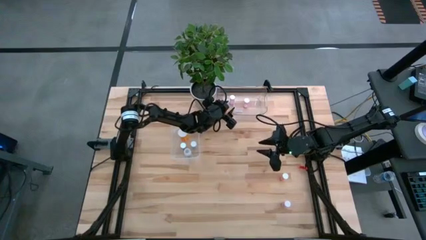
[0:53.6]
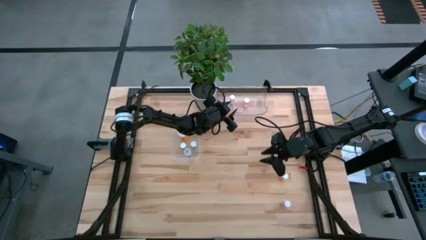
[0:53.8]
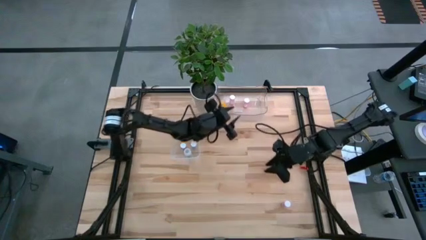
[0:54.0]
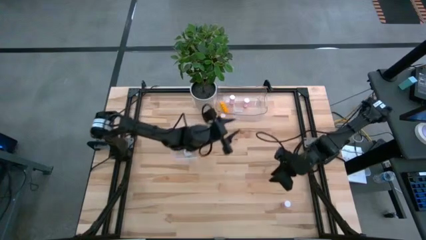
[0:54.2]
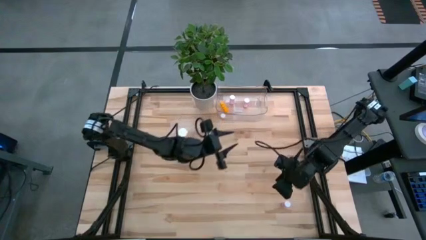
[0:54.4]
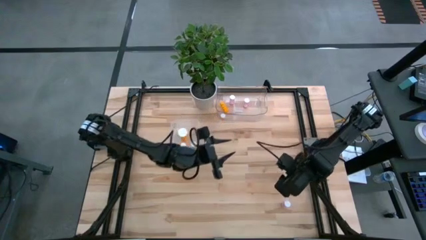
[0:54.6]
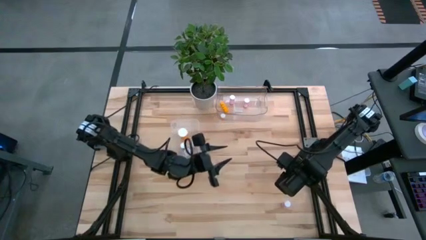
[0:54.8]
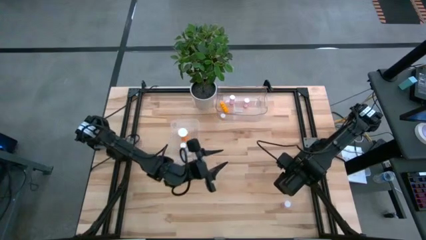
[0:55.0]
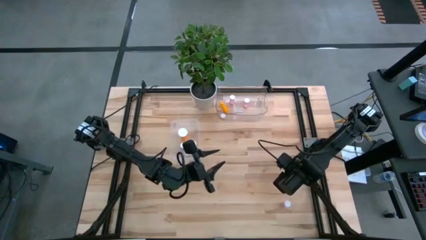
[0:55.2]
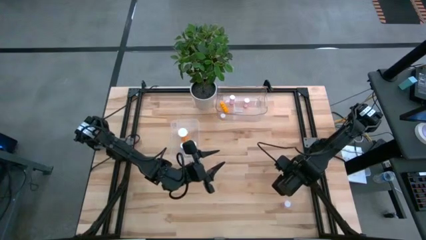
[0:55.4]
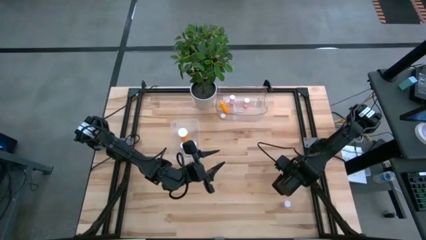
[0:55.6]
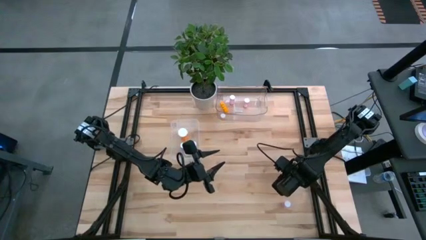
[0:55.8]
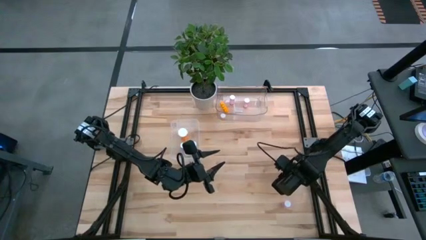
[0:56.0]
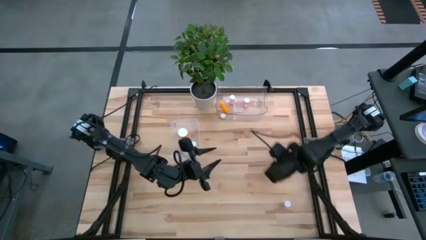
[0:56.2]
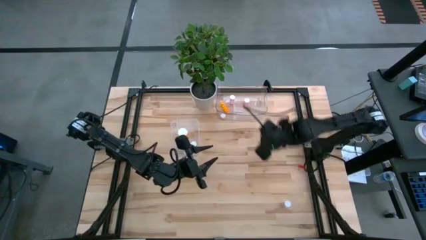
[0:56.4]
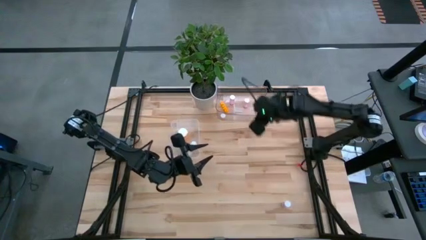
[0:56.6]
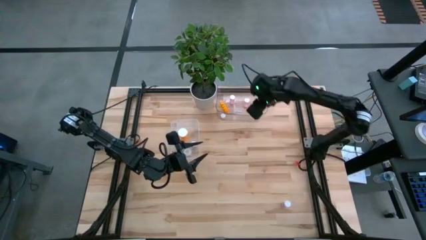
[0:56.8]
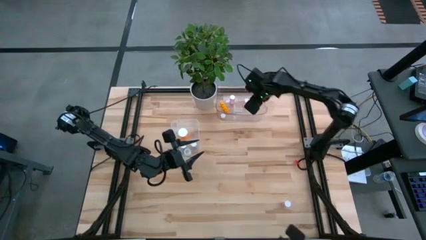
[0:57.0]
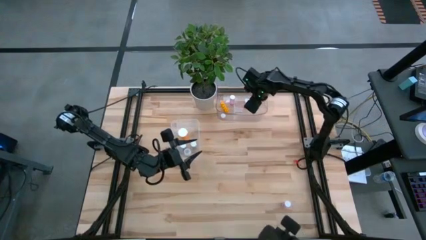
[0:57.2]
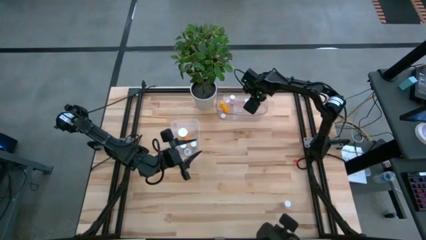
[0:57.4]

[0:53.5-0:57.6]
Task: Pick and place medicine bottles into bin by pill shape (circle, oval)
Put the red pill bottle into the top transparent bin

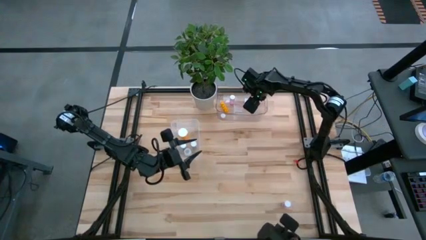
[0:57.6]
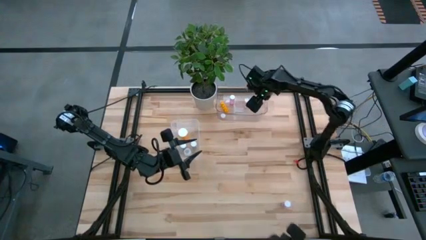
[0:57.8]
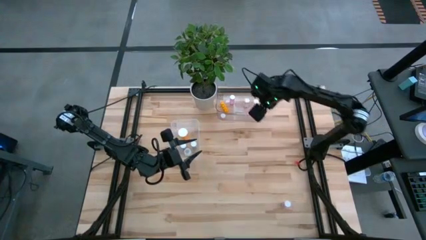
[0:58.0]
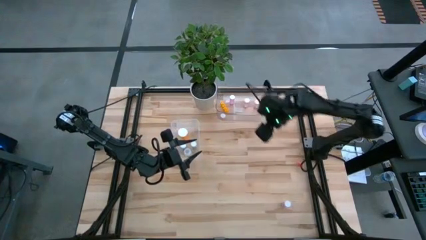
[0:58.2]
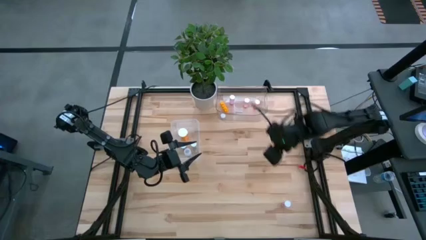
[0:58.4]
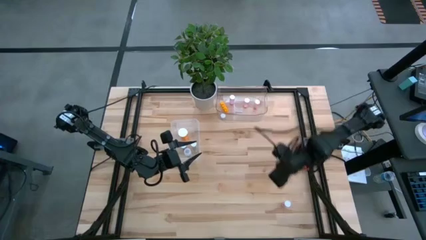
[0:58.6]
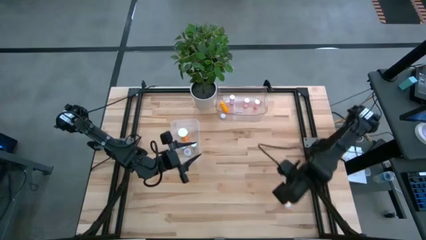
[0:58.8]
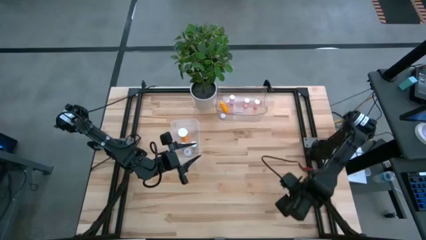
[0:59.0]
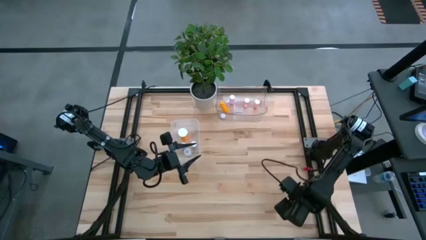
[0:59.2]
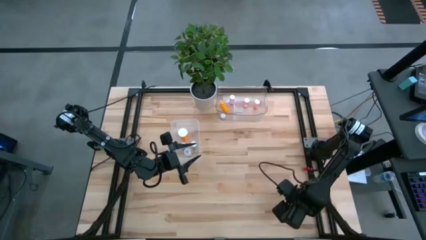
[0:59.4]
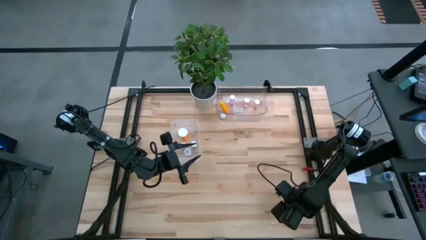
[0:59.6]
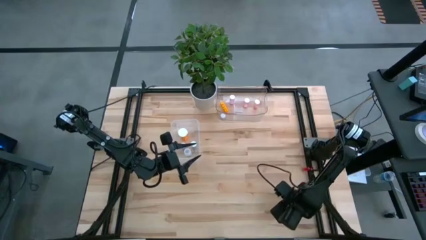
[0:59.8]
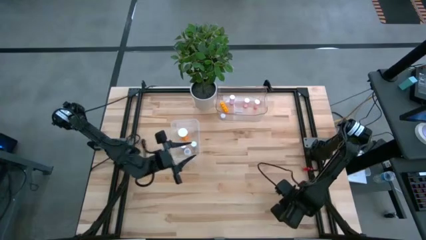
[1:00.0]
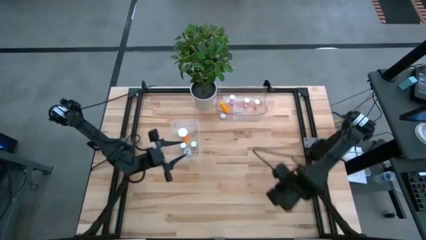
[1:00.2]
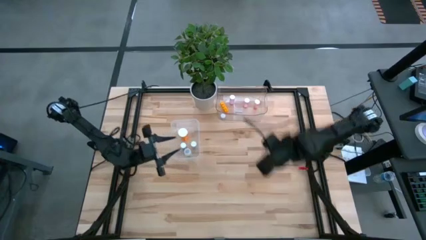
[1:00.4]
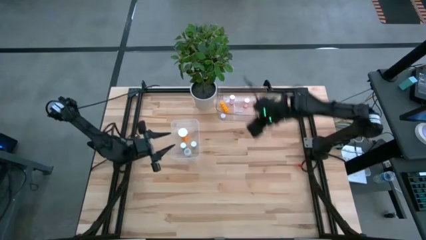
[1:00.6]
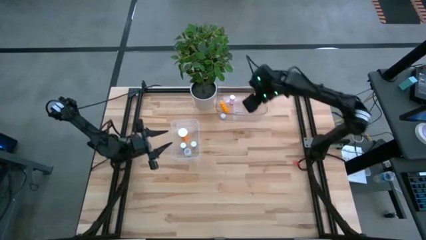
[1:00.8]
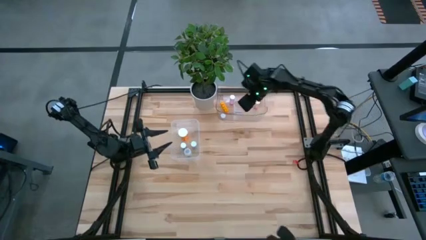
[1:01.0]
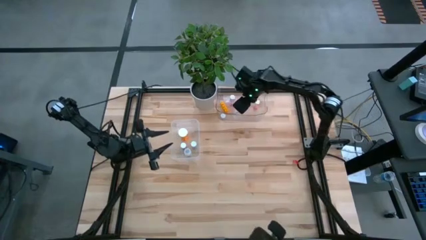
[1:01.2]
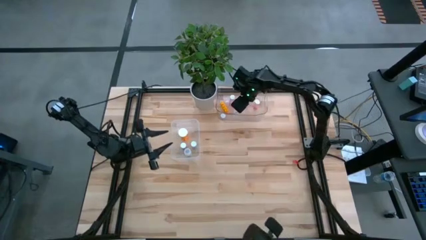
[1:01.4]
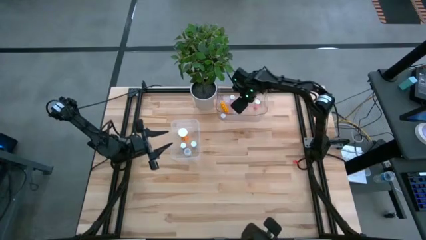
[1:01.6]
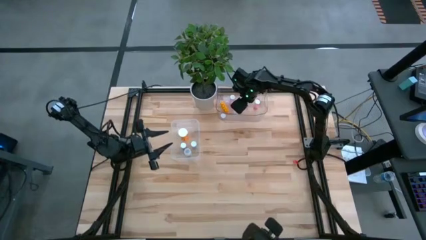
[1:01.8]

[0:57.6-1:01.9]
Put the pink pill bottle into the top transparent bin

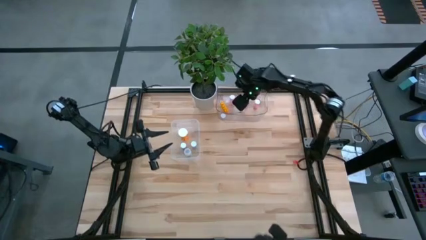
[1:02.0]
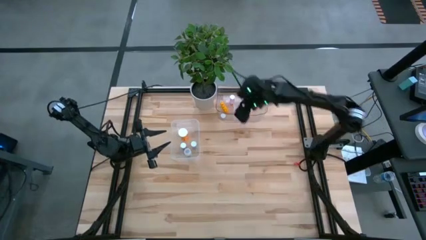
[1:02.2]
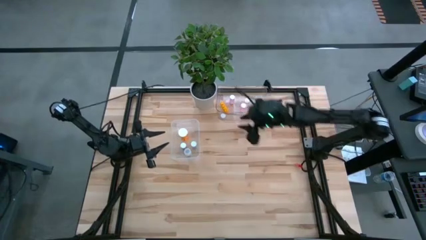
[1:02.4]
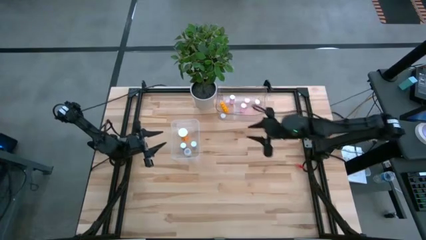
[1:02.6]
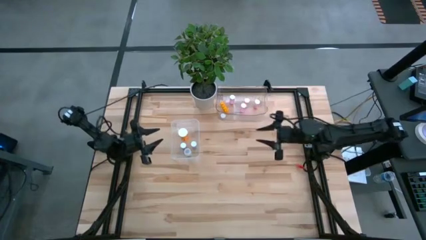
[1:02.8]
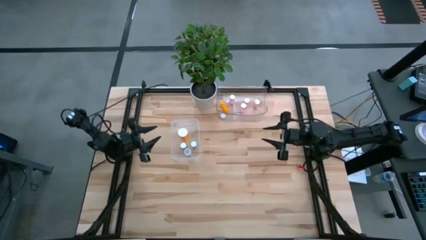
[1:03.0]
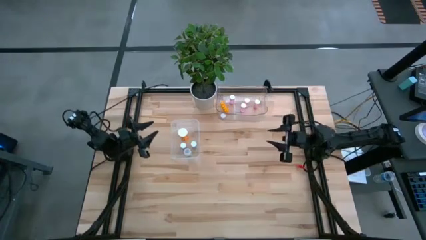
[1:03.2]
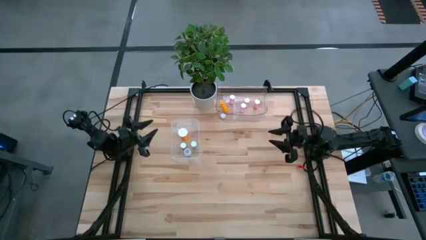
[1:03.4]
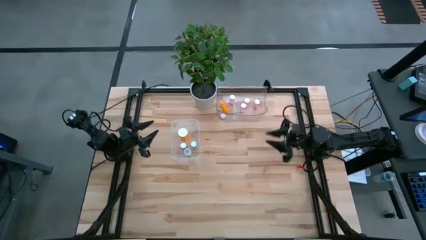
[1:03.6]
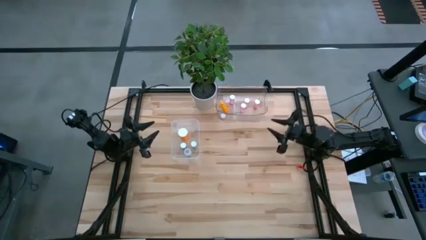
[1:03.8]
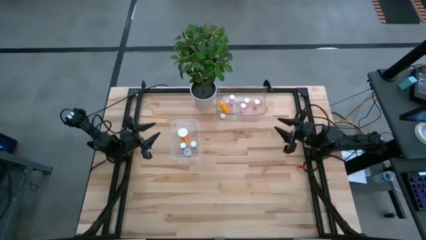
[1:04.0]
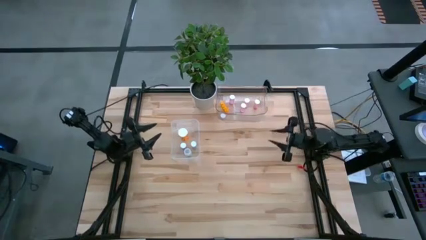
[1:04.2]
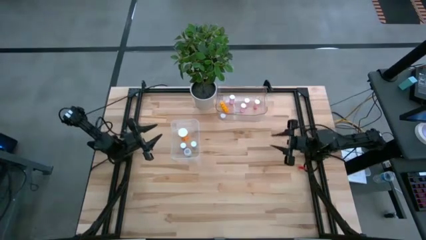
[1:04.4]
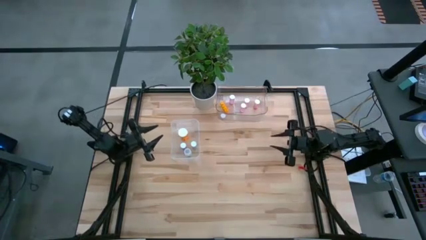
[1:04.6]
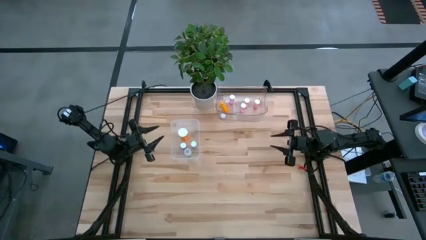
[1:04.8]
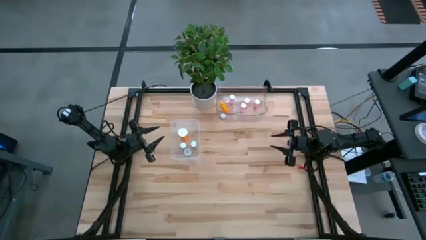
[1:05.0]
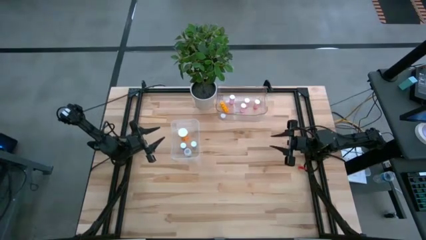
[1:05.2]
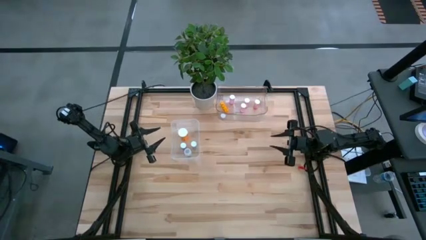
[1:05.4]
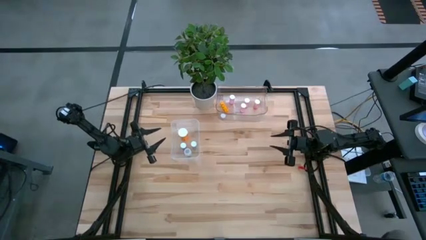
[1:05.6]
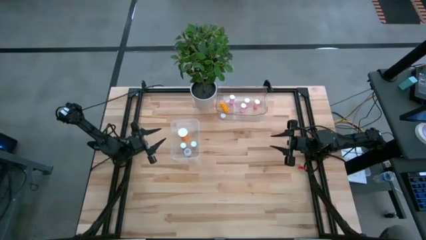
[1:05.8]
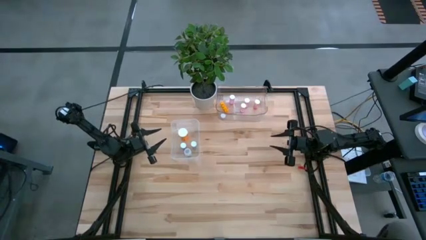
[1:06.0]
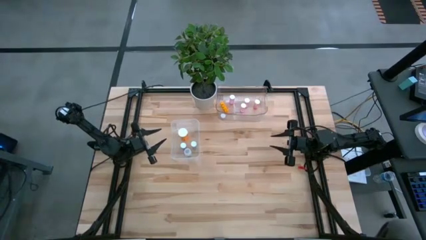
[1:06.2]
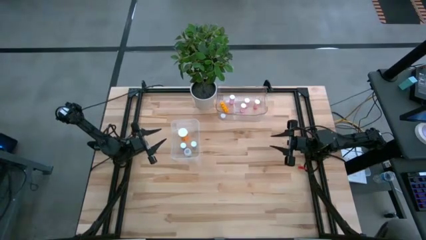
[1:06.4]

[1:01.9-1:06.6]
Return to Home Position

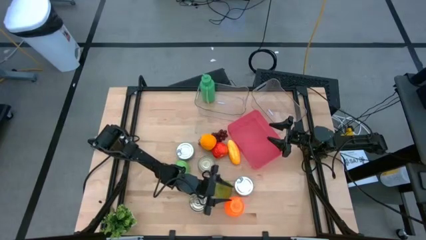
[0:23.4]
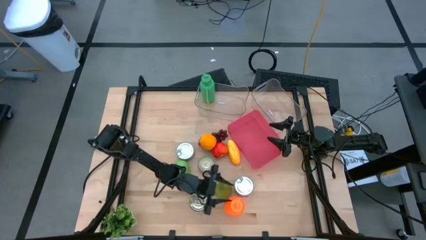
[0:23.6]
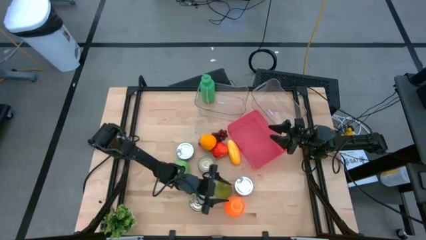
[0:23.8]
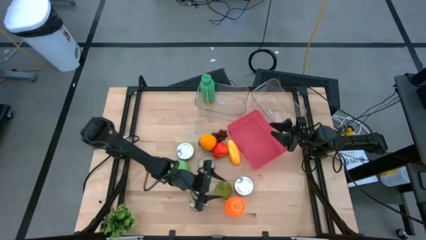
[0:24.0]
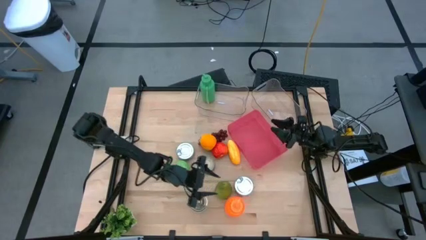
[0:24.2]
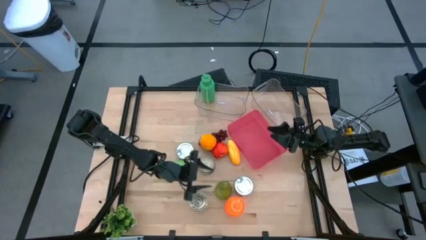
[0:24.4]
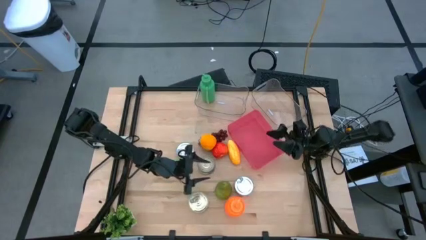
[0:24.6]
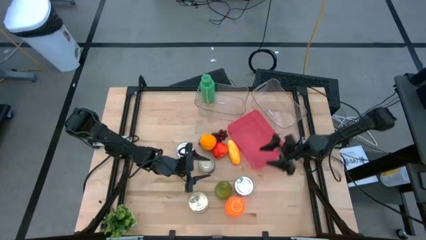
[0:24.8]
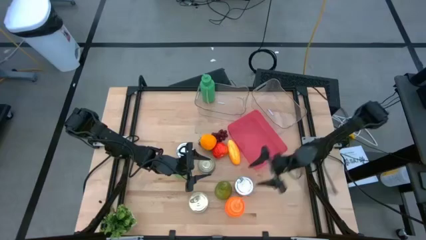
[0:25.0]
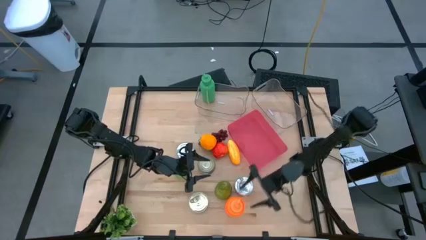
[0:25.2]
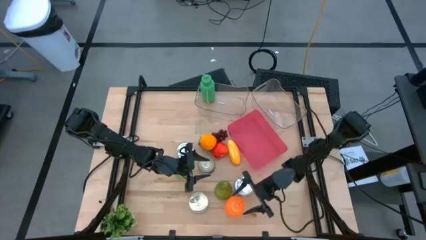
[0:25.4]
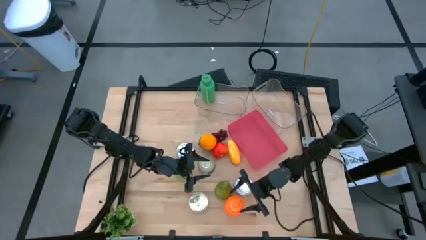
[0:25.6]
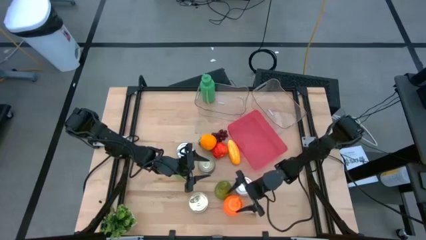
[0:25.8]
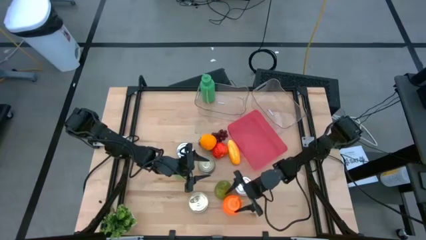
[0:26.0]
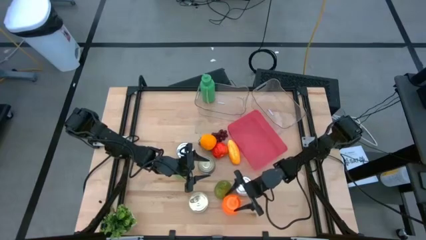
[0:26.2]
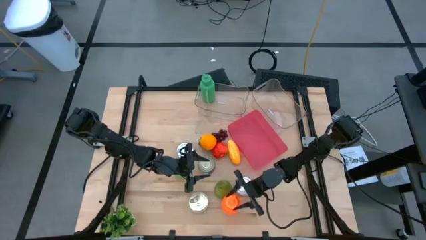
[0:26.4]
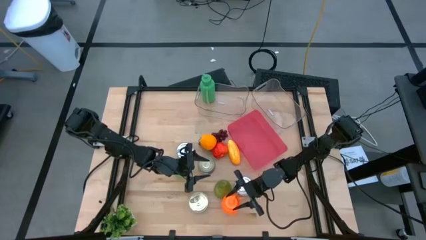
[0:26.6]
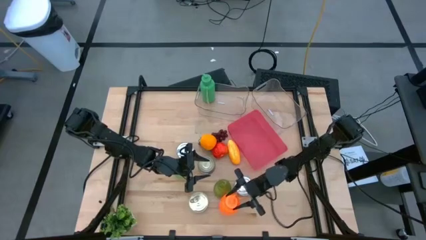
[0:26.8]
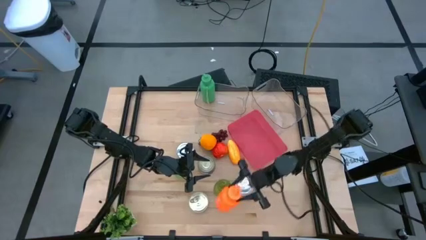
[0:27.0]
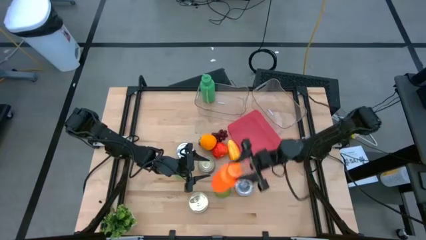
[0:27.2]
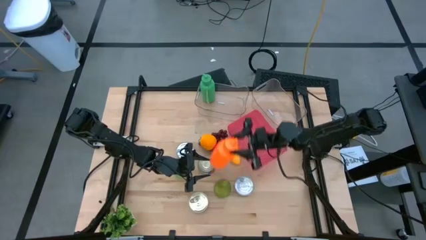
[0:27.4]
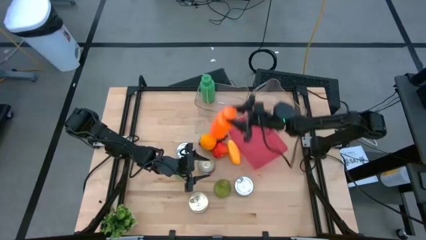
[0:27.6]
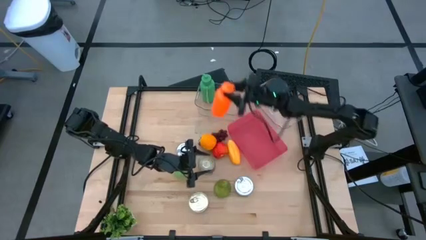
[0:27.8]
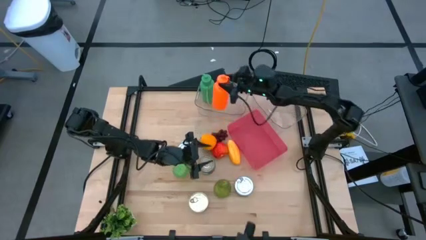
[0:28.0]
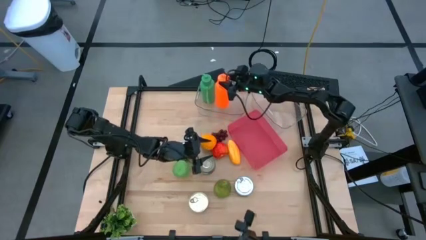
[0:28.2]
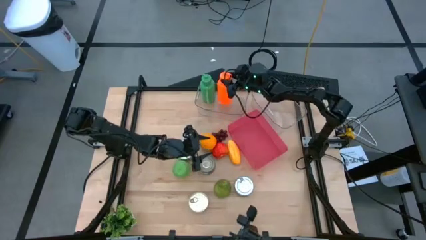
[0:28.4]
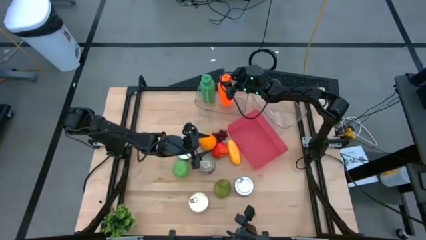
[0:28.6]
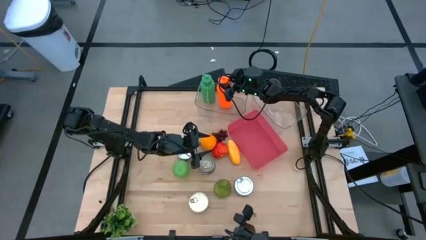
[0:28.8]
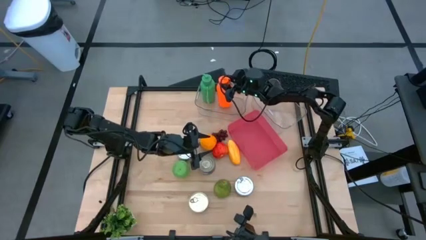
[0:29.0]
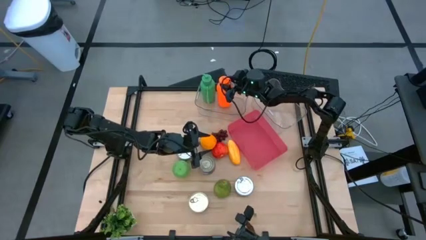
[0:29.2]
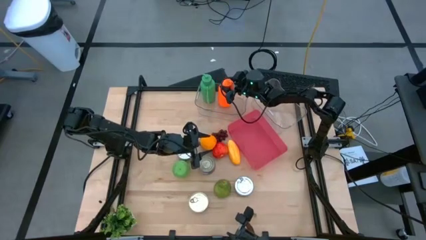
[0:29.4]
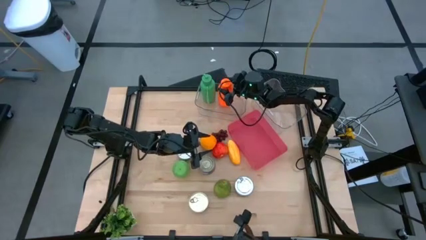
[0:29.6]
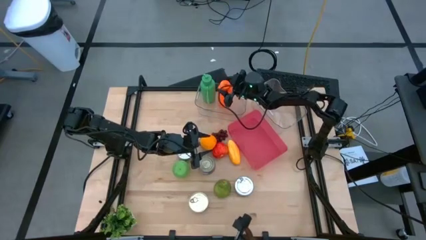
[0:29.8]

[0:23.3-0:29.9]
Task: Pick & Place Food Item
Put the orange water bottle into the left transparent bin
